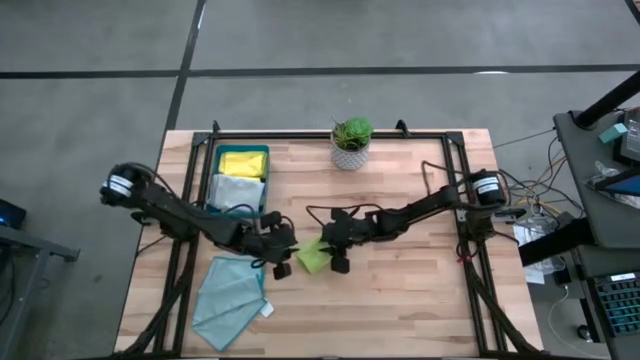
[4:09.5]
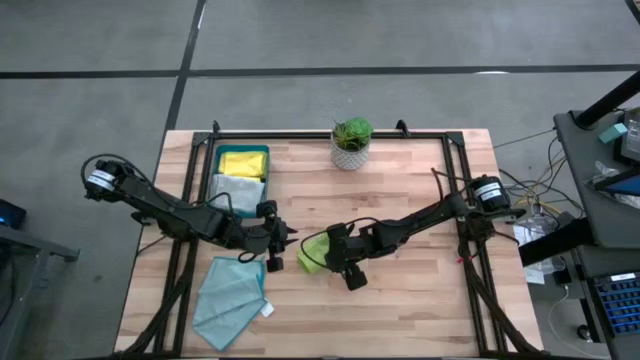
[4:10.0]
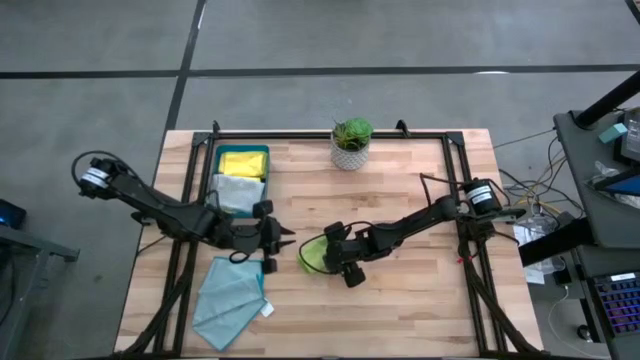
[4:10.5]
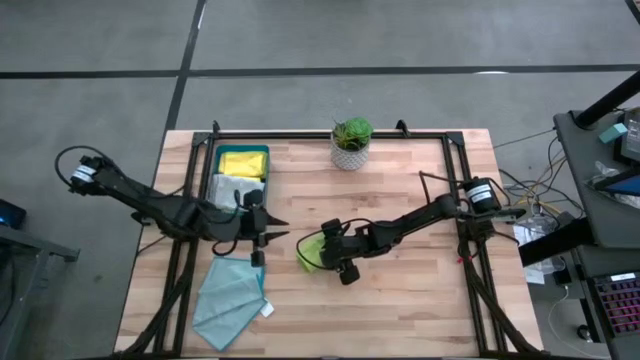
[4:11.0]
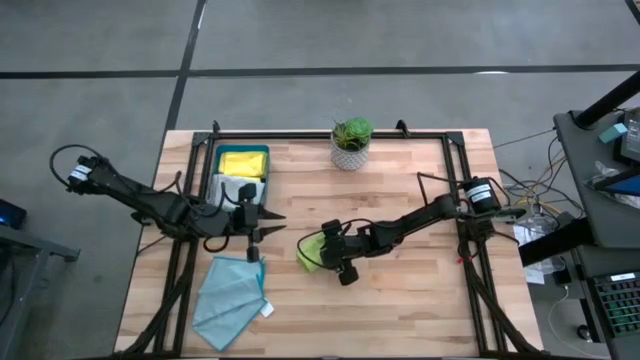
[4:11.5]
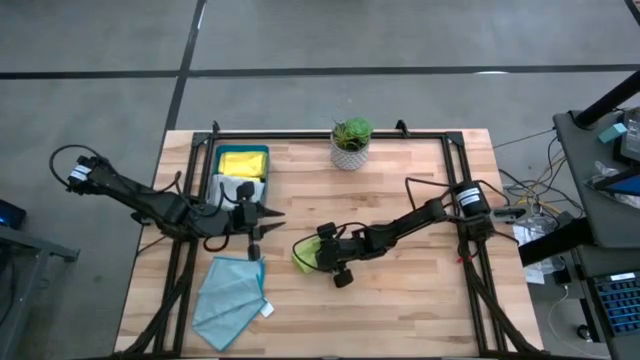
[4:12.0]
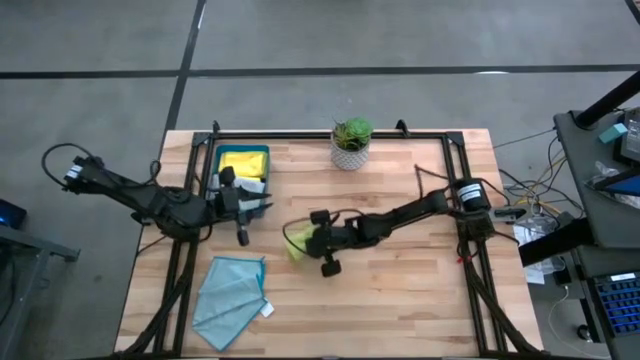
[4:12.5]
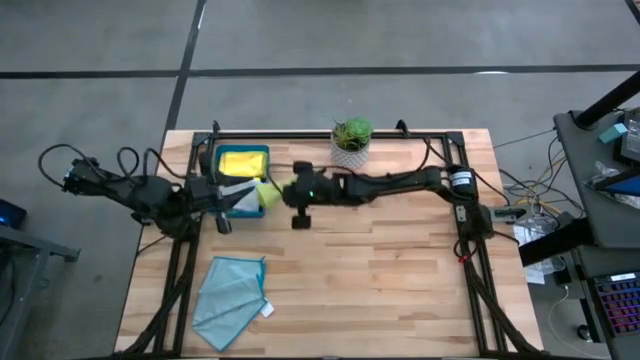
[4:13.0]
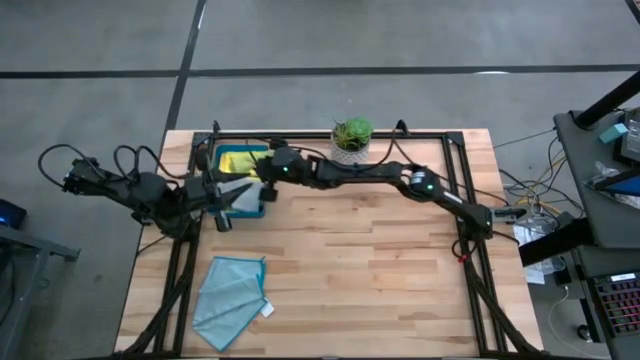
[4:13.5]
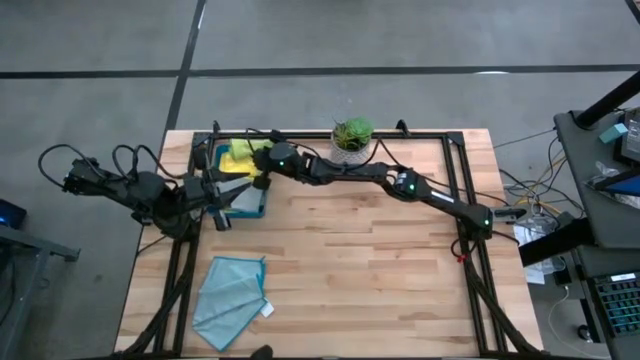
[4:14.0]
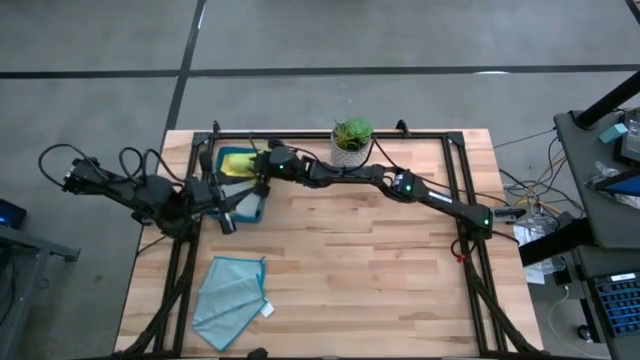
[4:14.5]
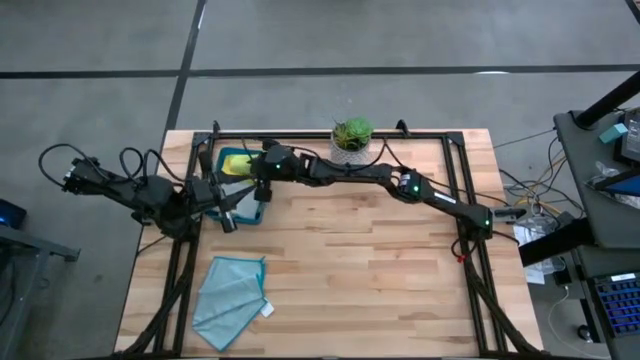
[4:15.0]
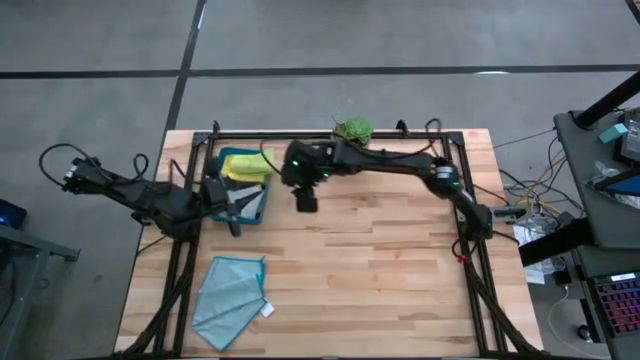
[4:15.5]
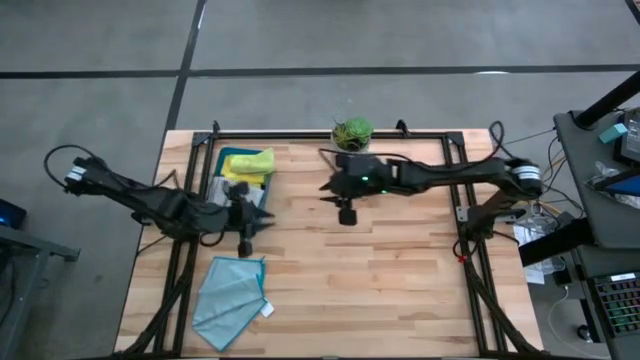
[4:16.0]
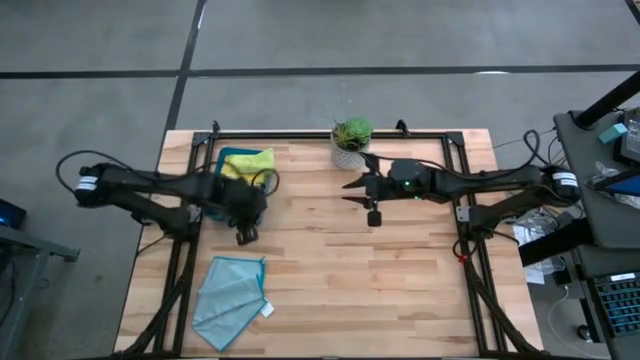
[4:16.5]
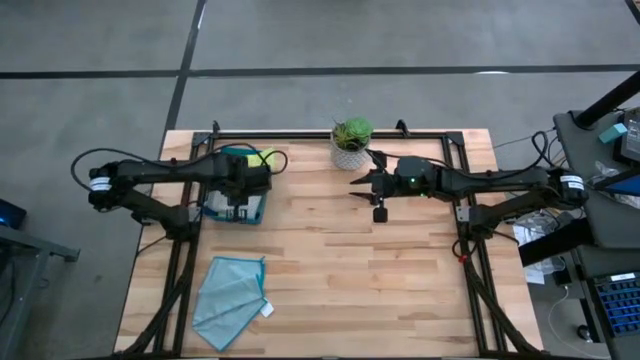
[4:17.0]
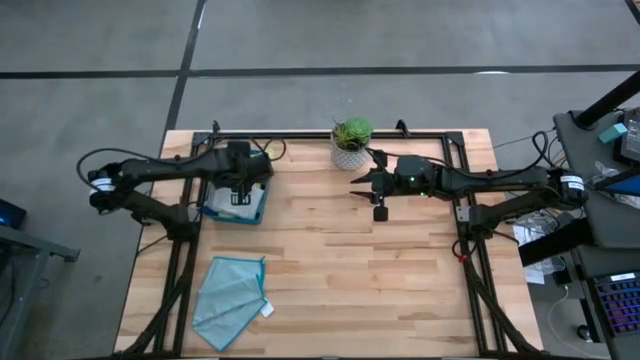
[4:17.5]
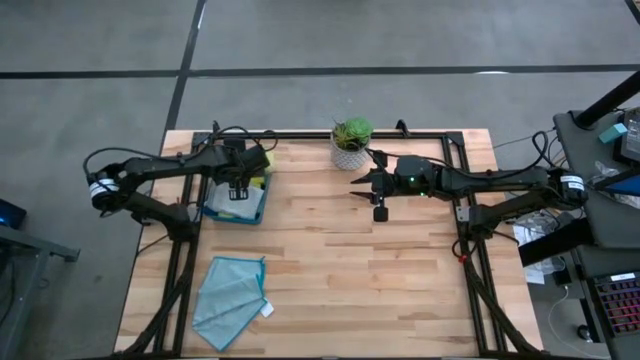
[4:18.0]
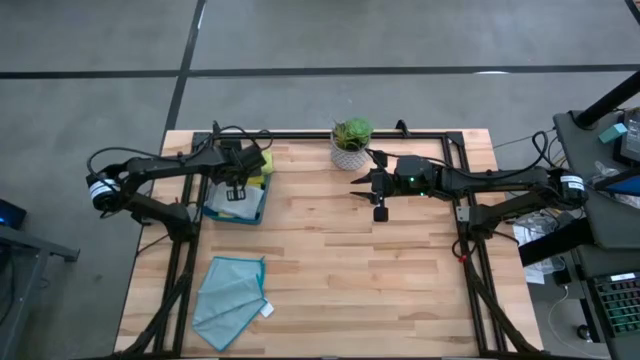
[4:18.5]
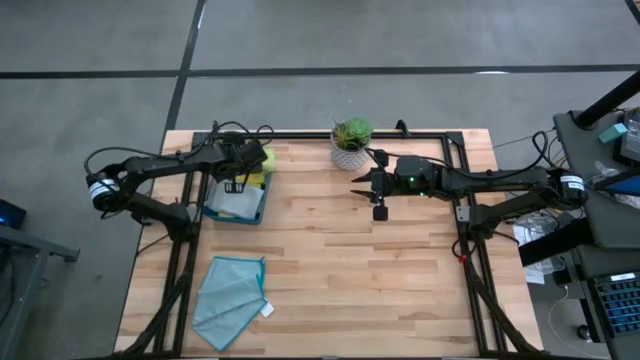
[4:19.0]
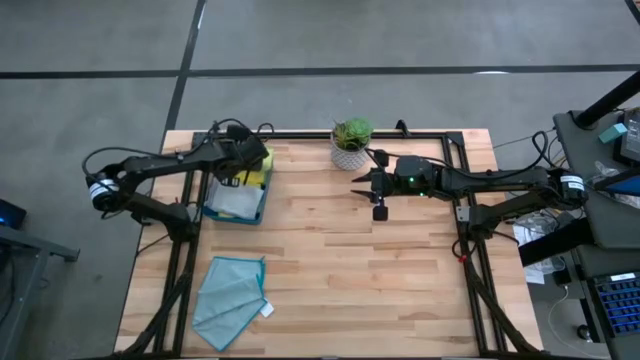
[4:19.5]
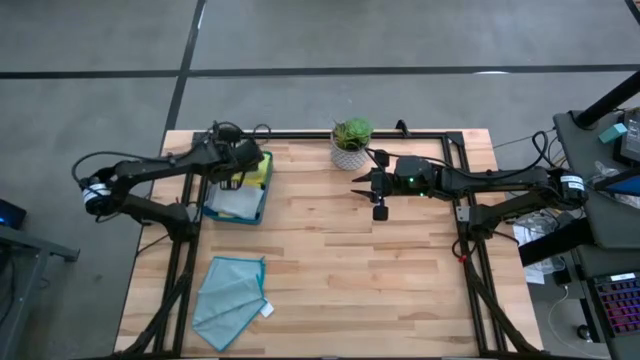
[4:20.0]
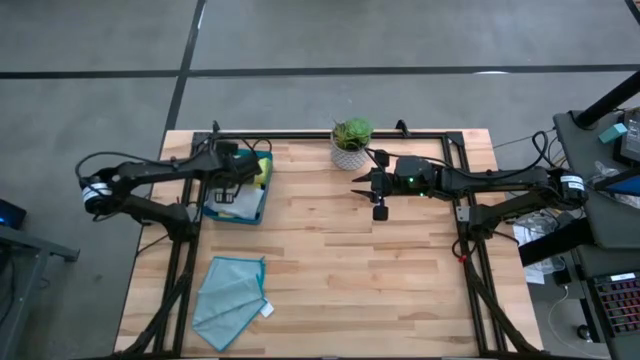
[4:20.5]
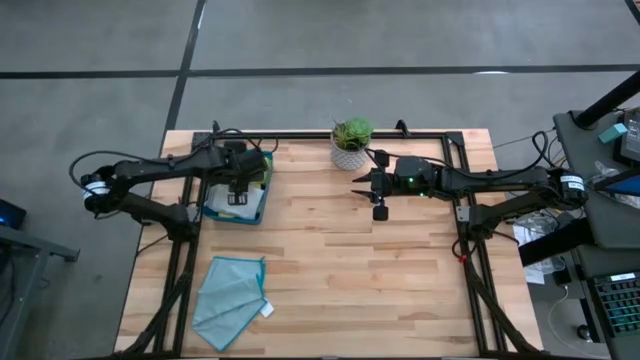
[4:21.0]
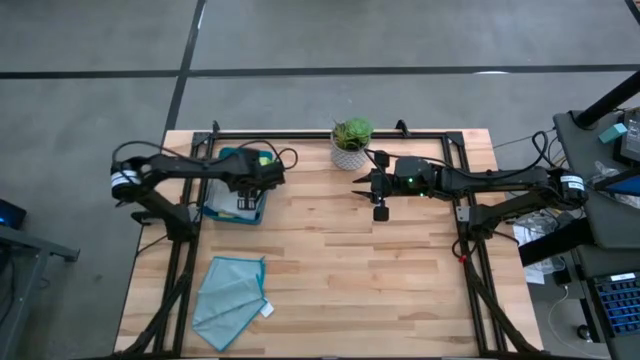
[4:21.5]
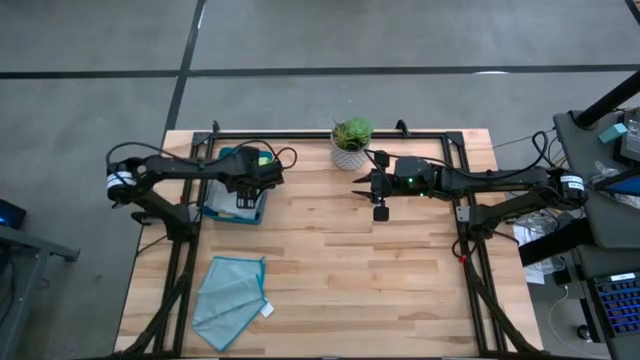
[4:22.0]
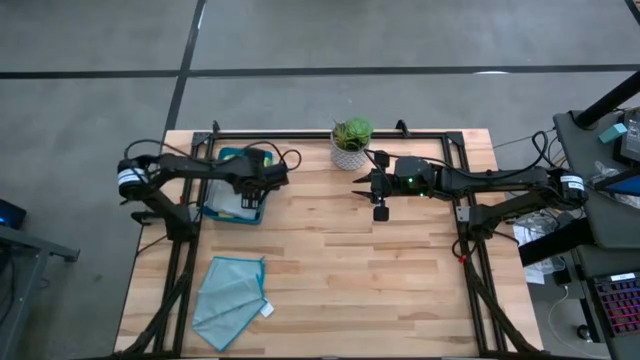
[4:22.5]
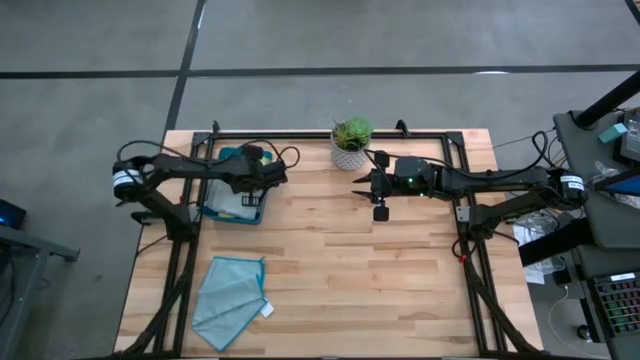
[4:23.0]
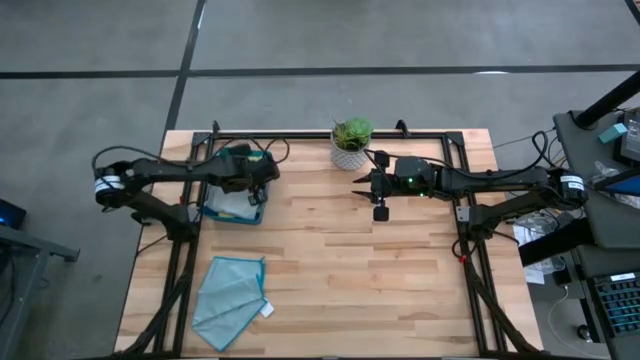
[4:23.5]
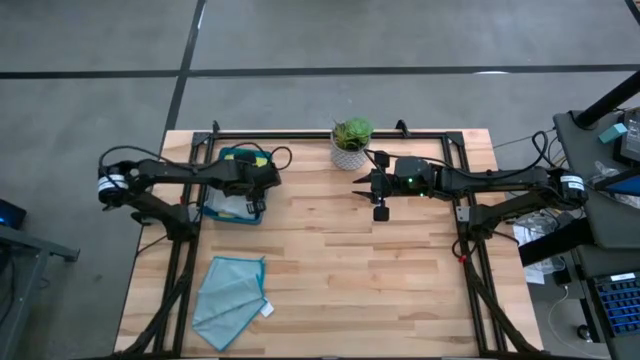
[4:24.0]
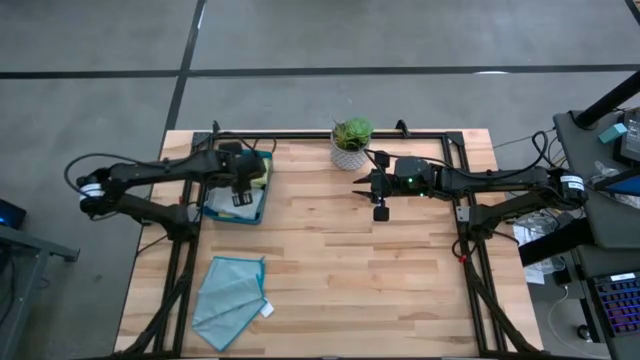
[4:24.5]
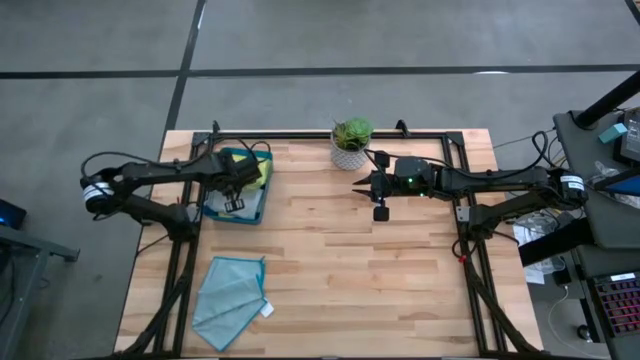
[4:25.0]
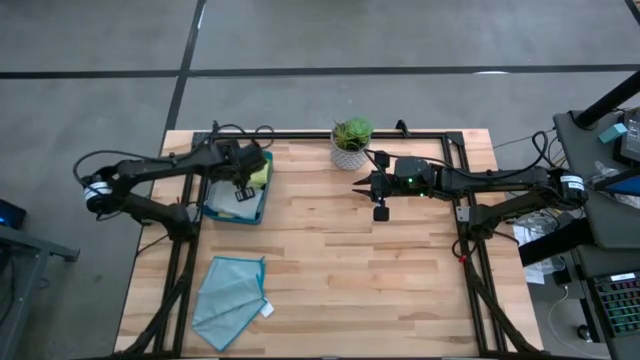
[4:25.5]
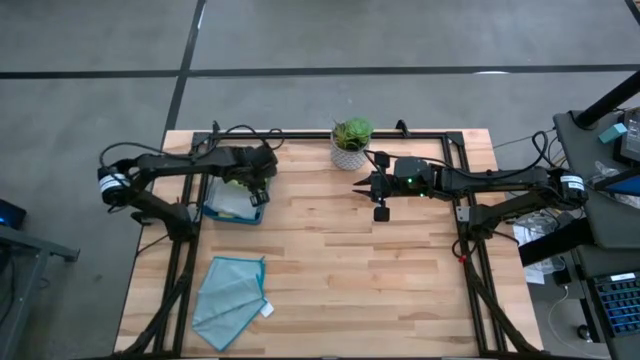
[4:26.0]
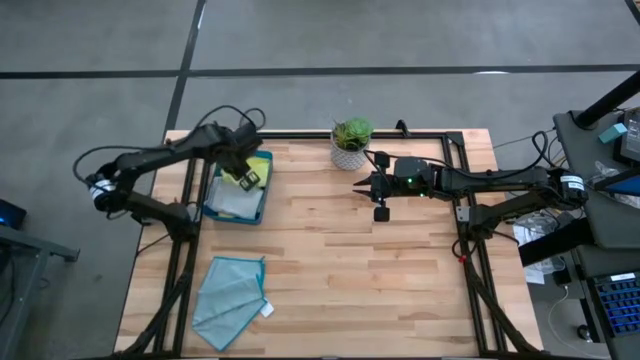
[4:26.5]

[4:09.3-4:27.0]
Task: Fold microfiber towels
Put the folded green towel into the blue bin

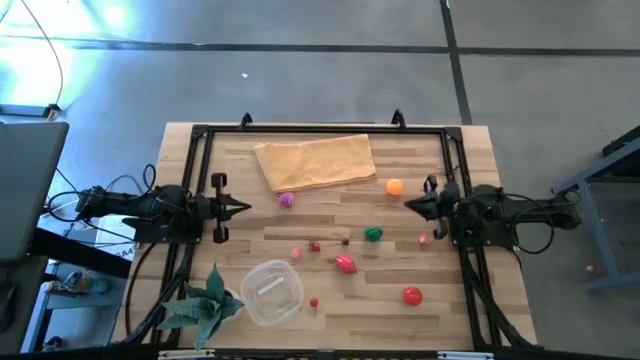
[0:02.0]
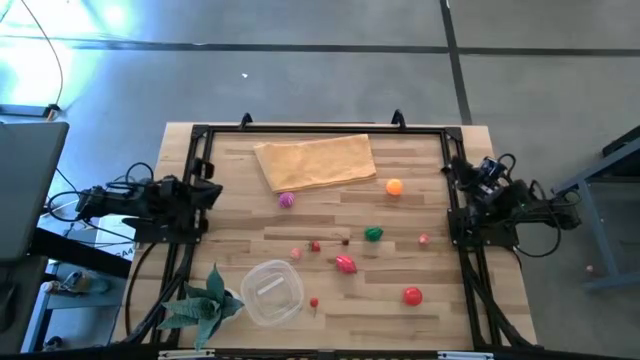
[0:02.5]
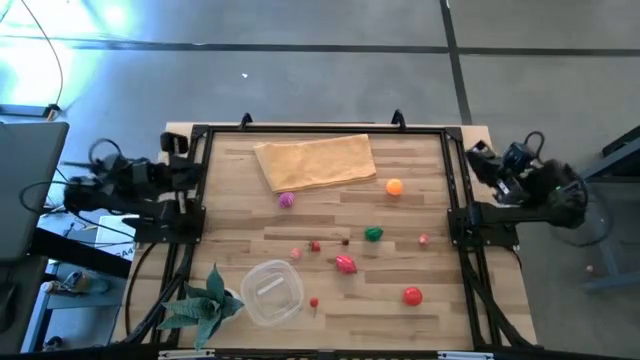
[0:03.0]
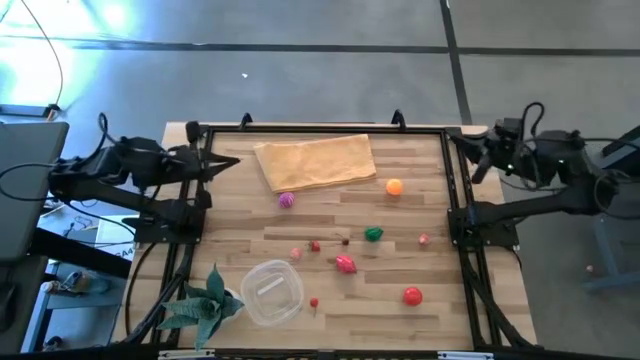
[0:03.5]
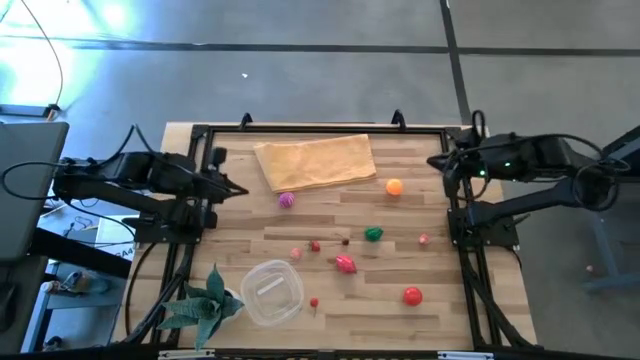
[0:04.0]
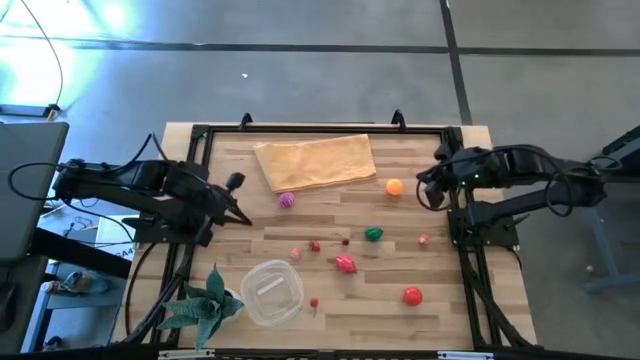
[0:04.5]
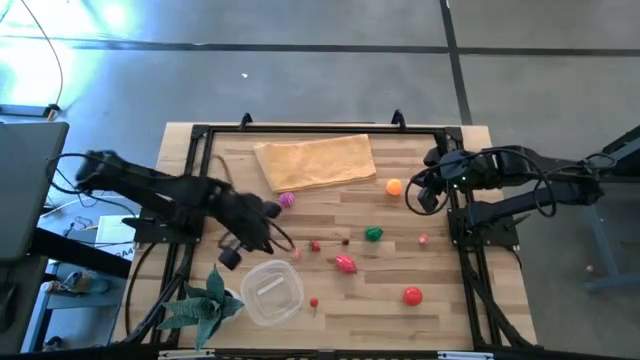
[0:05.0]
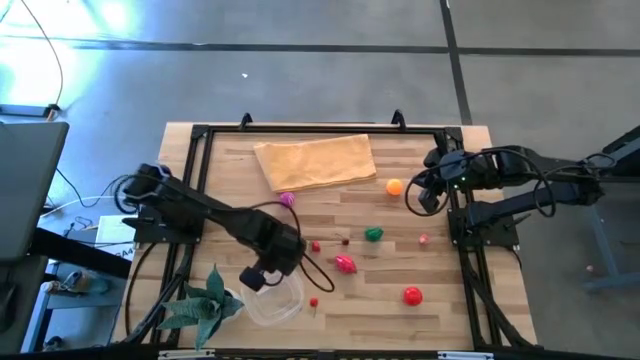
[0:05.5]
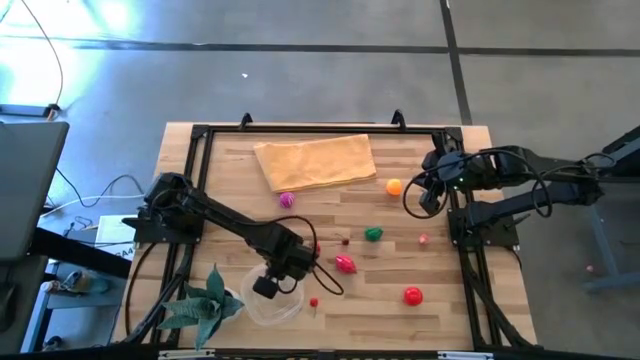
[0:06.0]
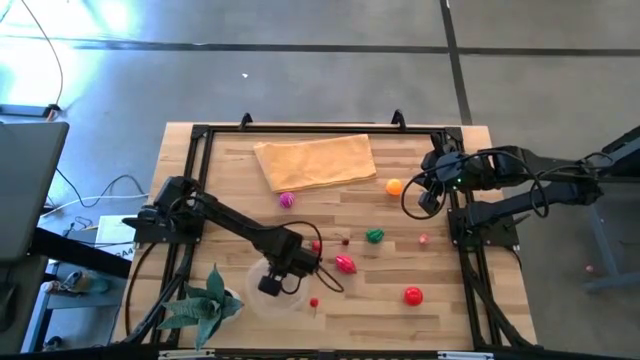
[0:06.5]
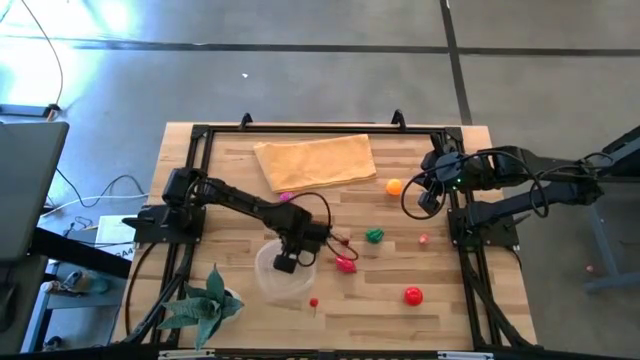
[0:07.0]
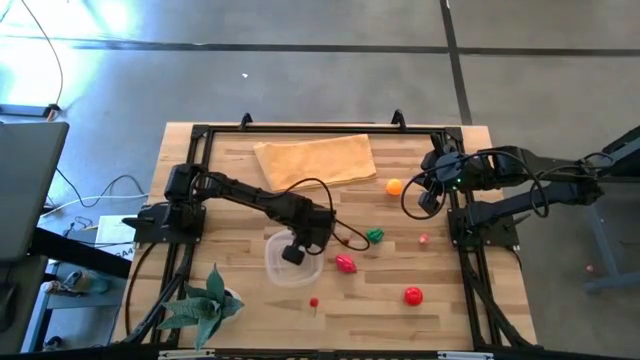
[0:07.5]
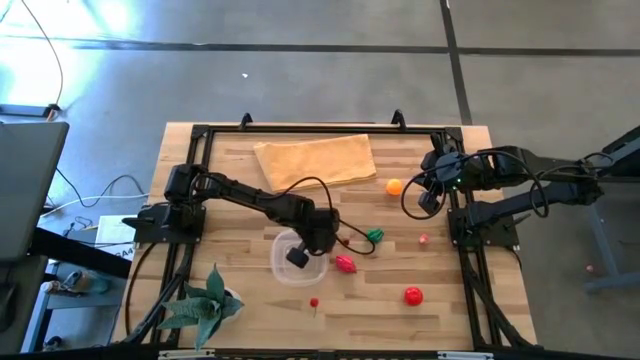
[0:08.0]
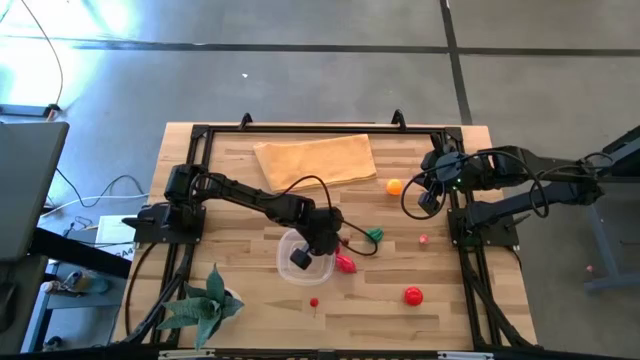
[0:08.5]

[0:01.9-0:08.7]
Task: Pick and placing Produce into tupperware
Move the transparent bin to the center of the table
